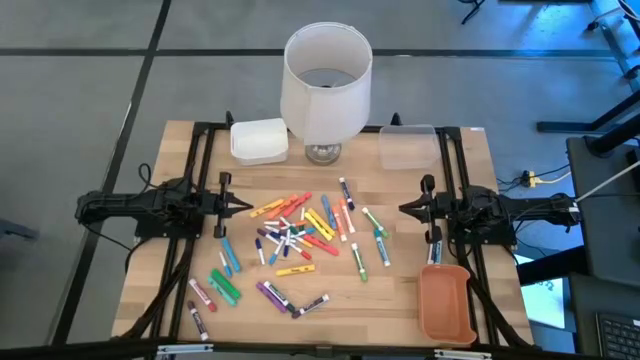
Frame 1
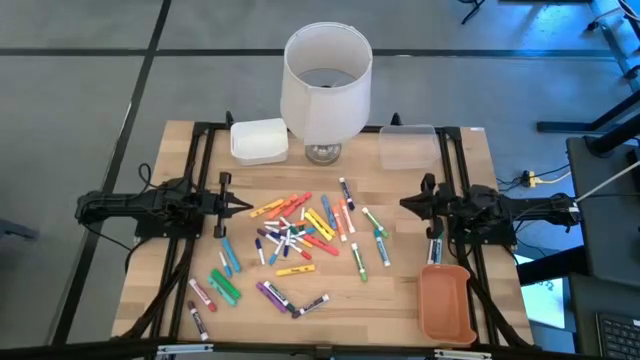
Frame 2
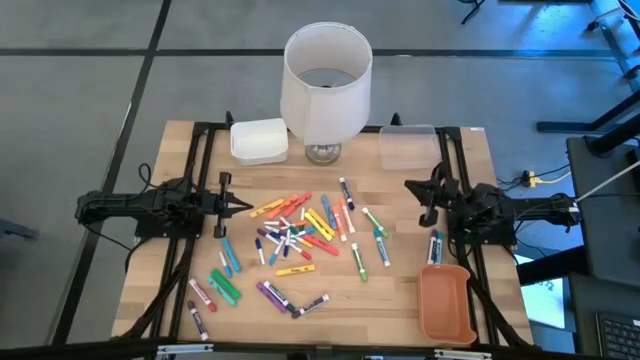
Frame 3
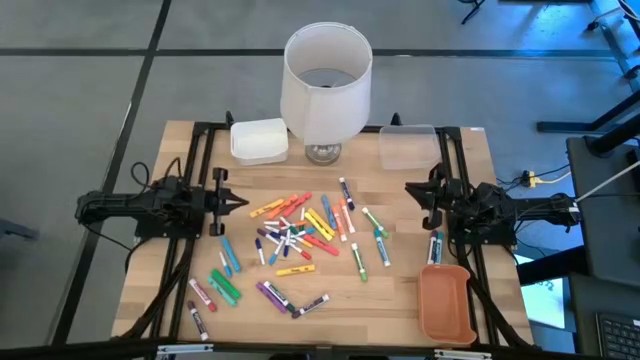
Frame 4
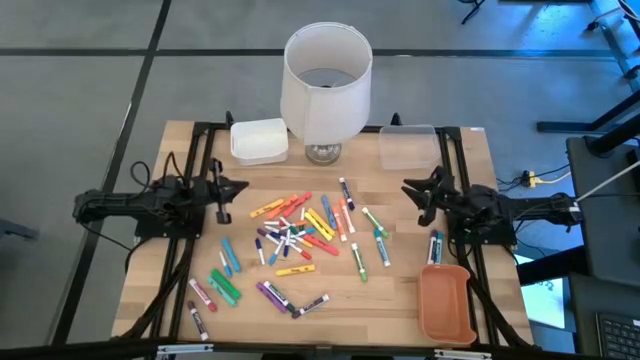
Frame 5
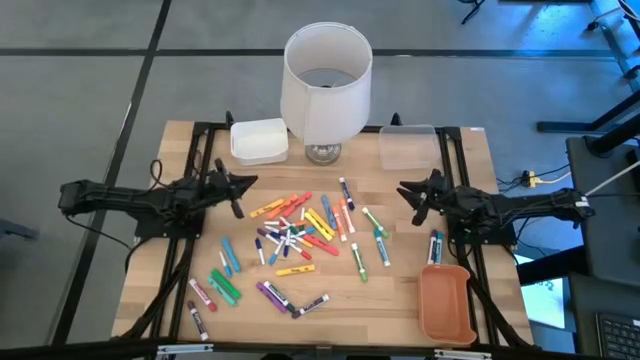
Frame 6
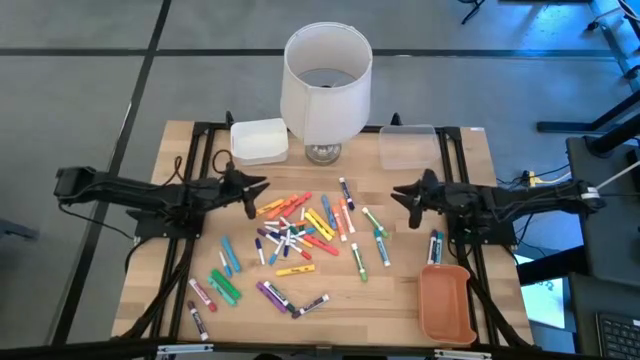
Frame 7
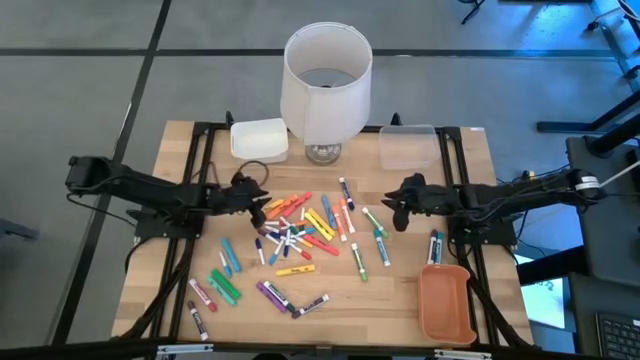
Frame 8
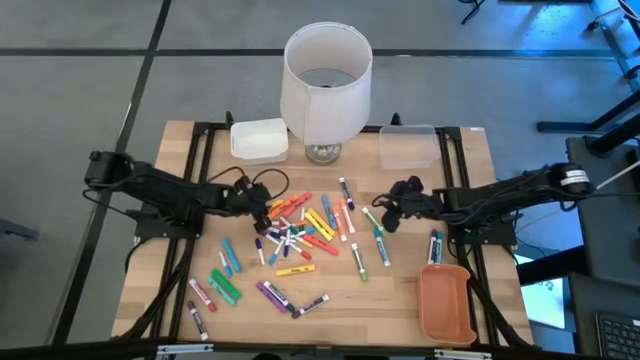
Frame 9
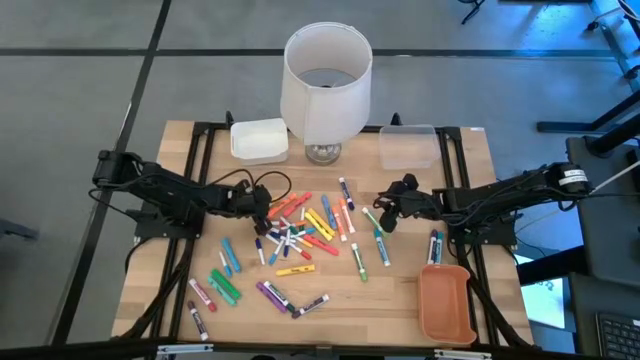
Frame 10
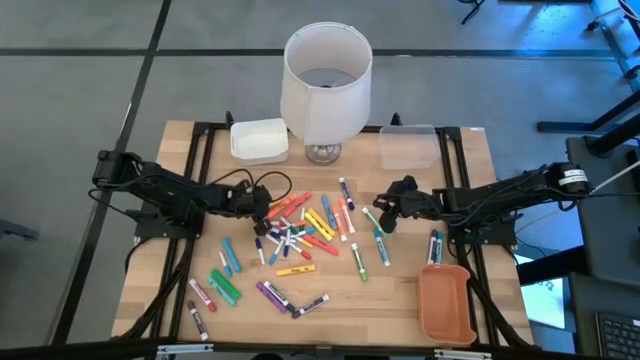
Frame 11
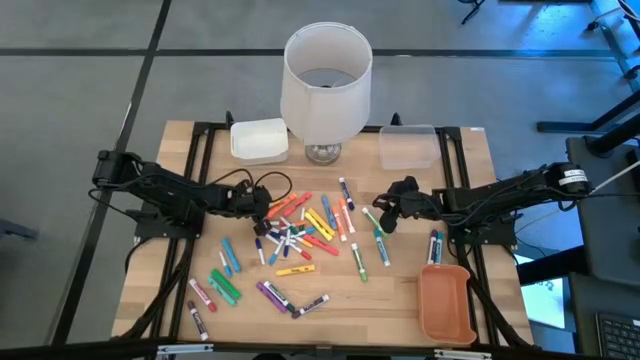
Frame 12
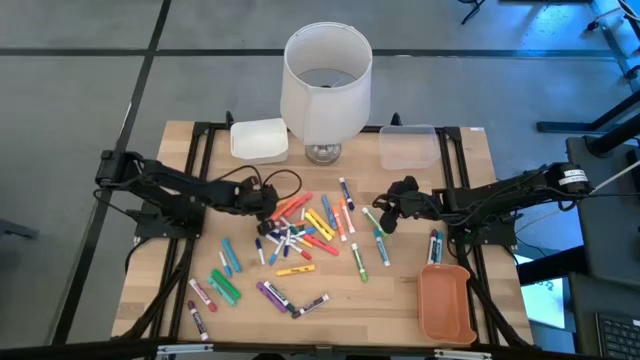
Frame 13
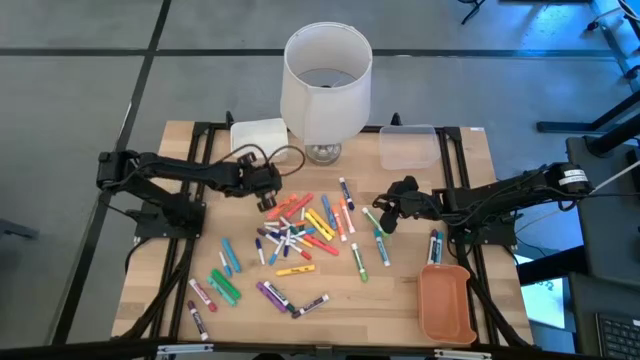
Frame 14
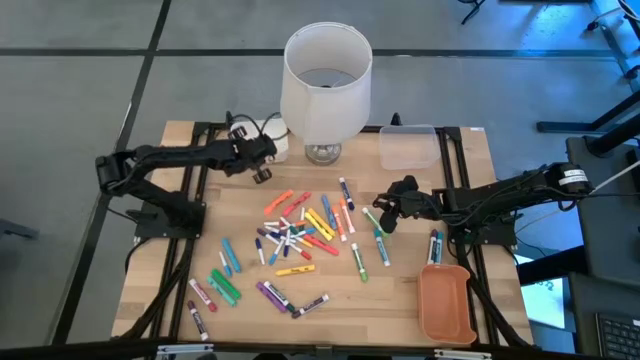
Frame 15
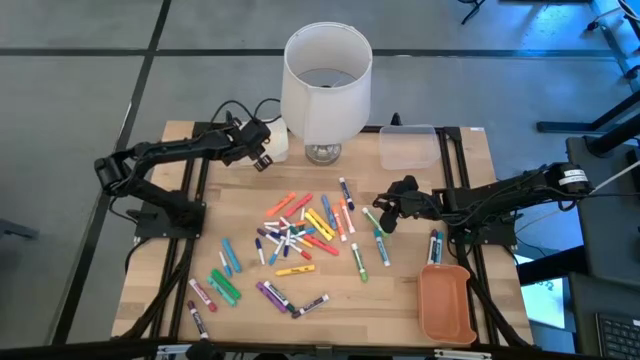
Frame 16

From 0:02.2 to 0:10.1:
Task: Pick & Place Markers
Put the yellow highlighter into the white bin

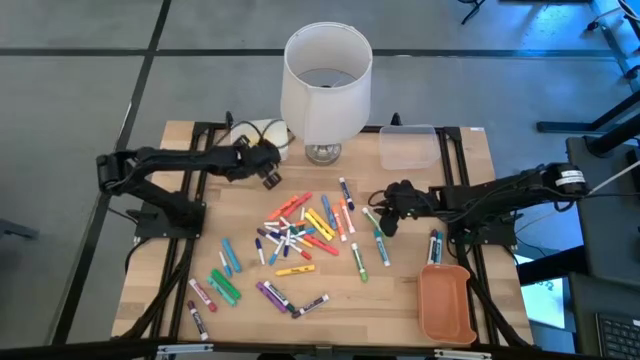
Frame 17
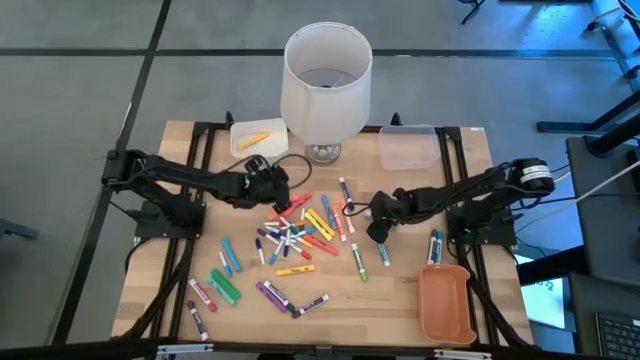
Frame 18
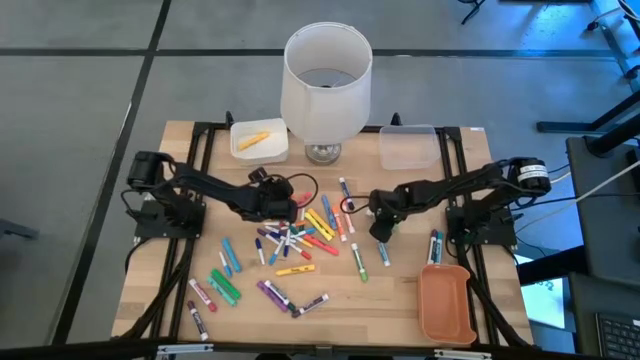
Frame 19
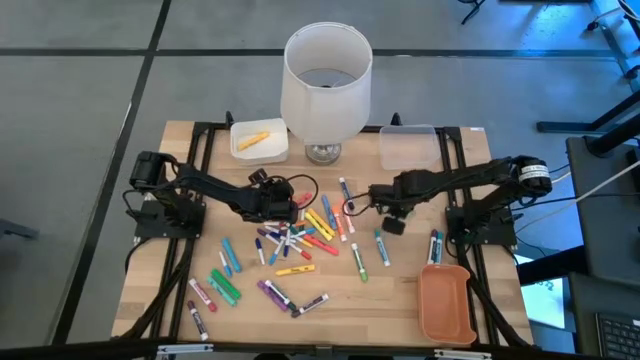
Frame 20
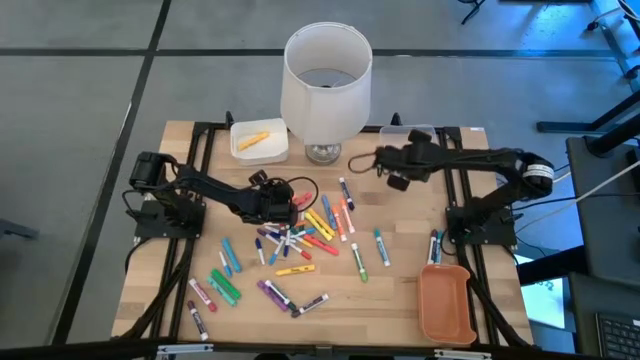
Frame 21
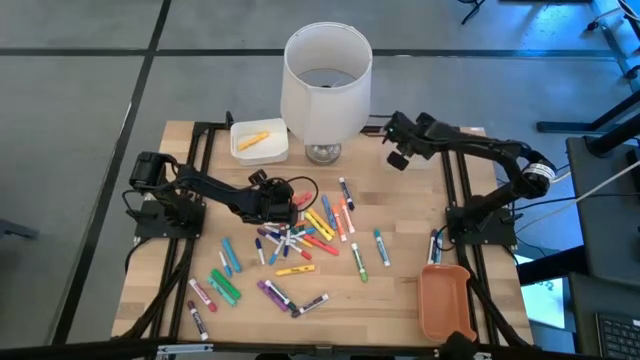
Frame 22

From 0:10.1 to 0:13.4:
Put the thick light green dry erase marker into the transparent bin

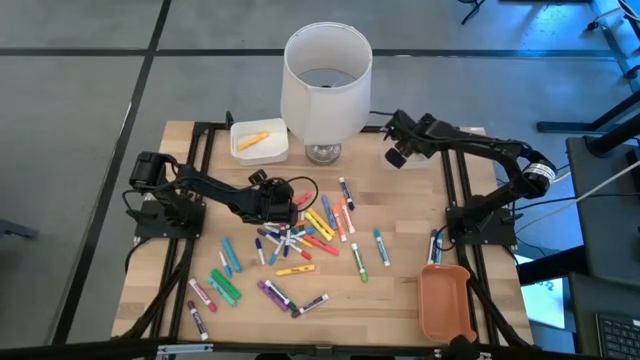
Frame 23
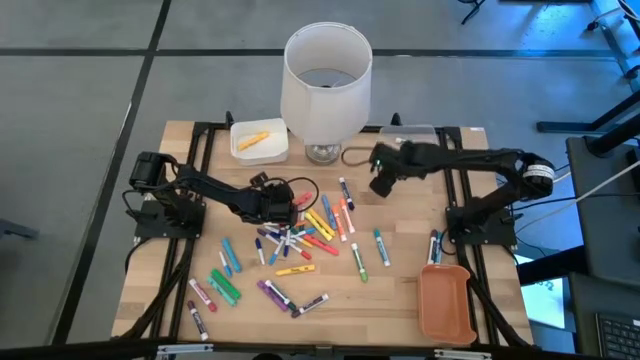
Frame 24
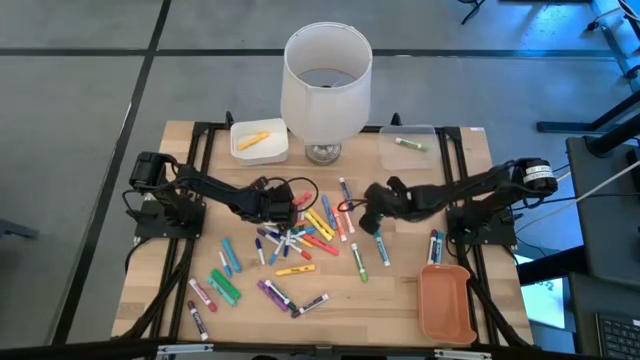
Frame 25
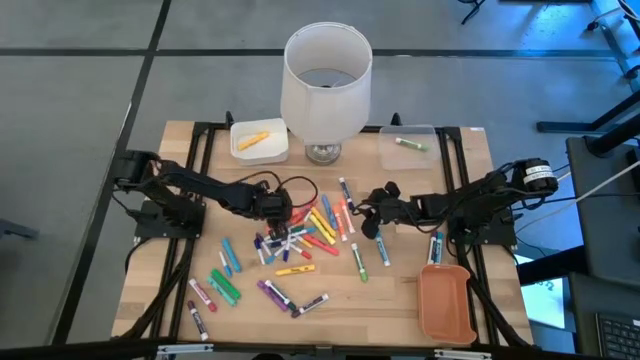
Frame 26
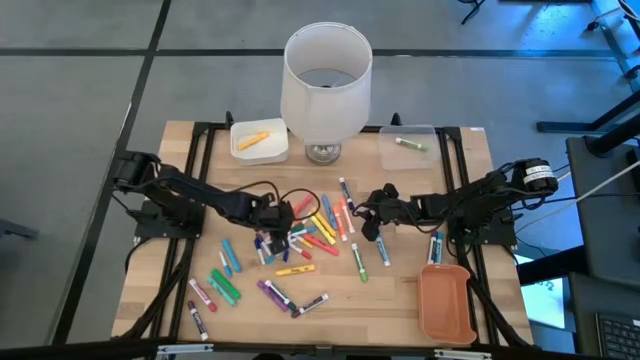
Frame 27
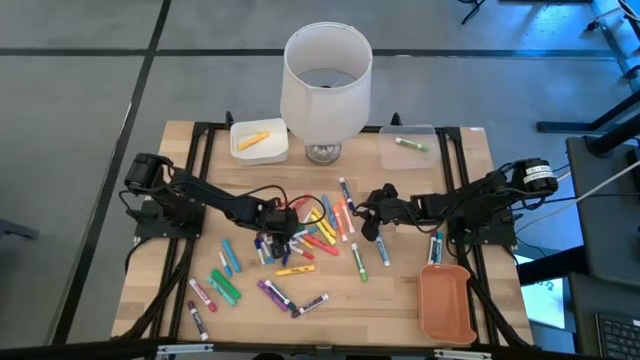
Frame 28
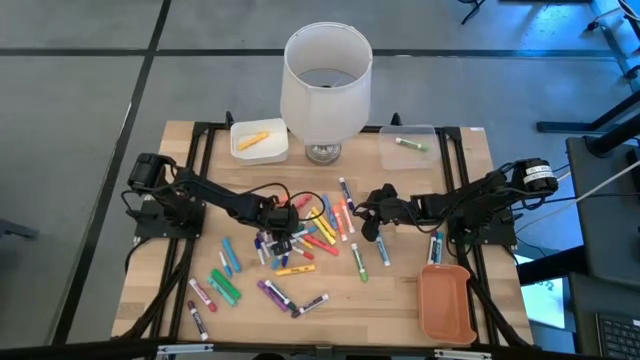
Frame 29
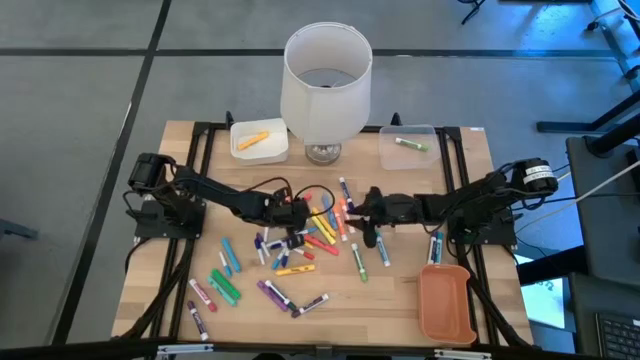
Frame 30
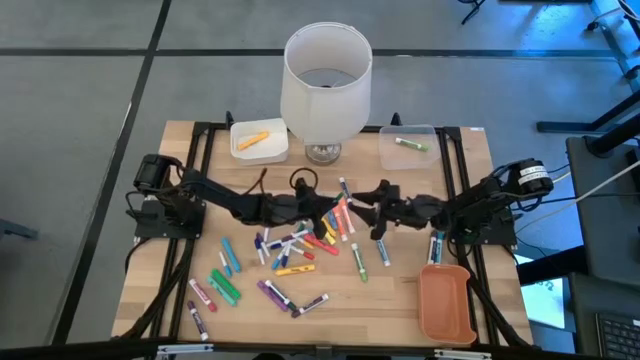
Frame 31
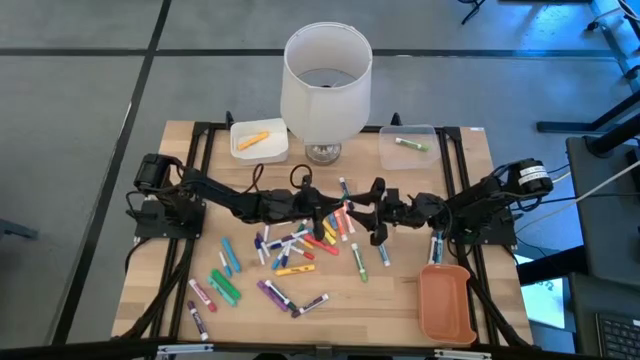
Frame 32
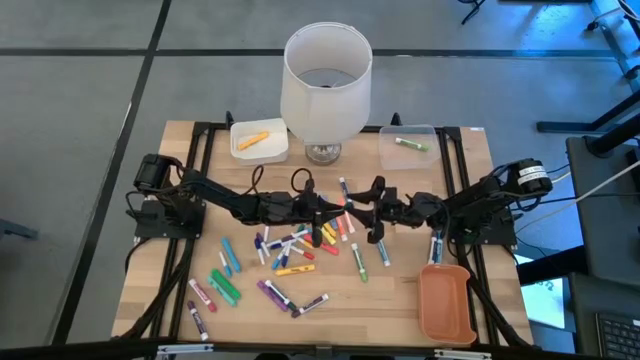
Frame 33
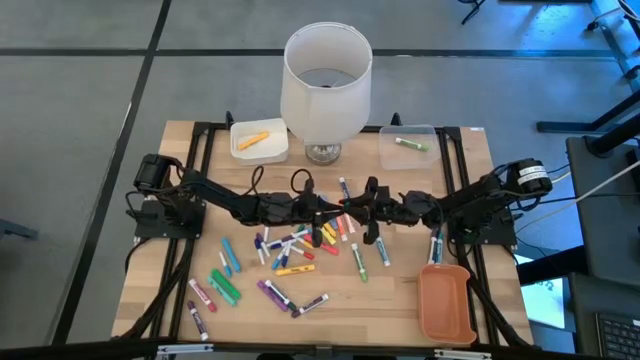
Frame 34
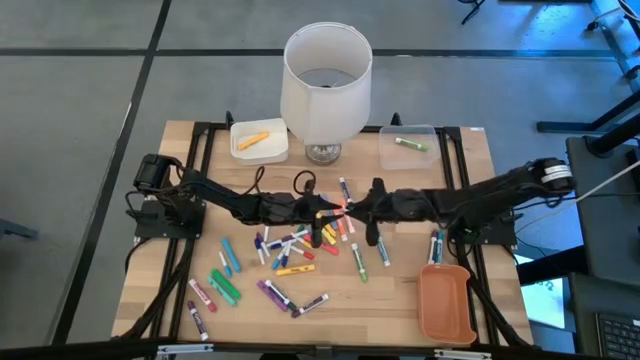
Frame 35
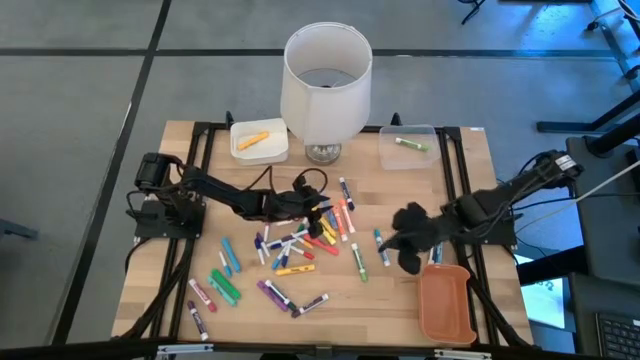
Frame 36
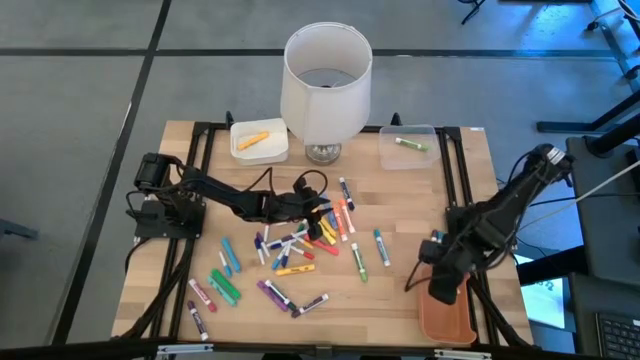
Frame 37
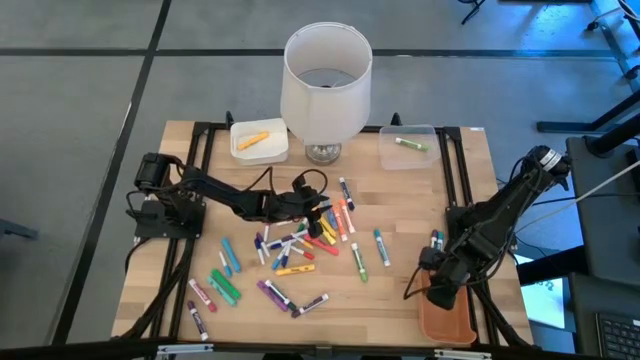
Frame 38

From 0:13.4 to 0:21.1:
Put the dark green mini marker into the orange bin

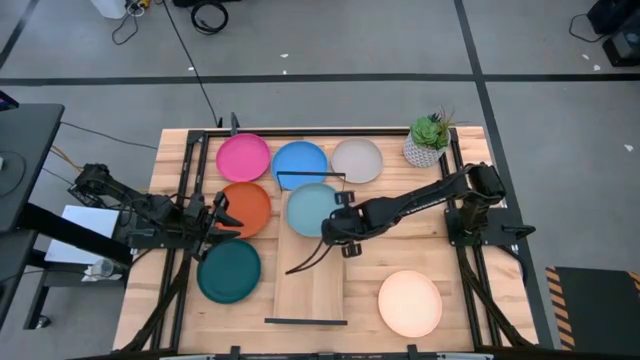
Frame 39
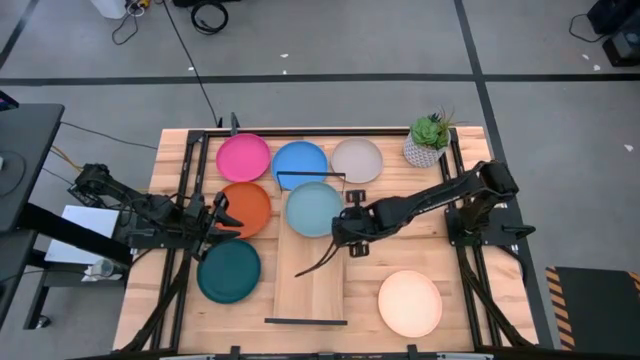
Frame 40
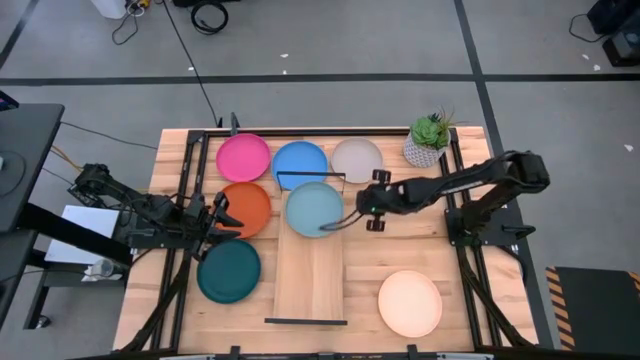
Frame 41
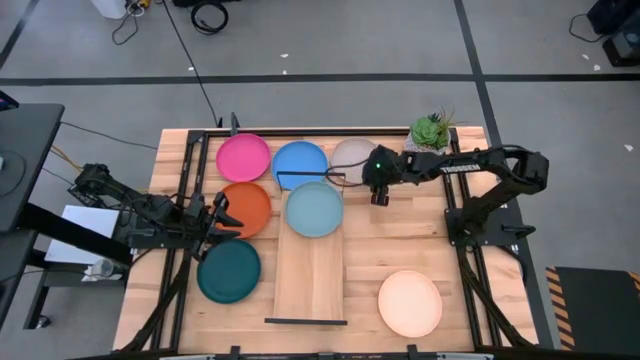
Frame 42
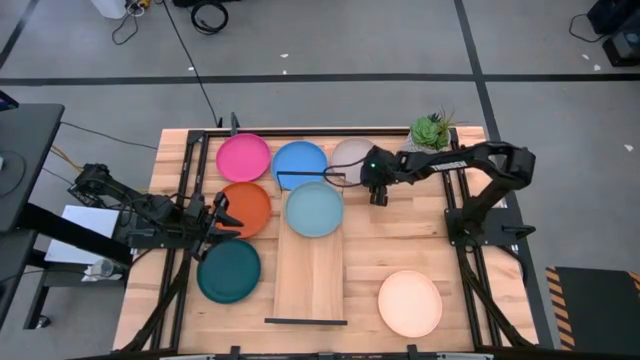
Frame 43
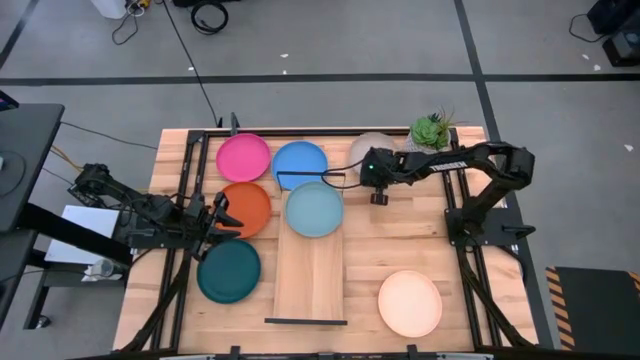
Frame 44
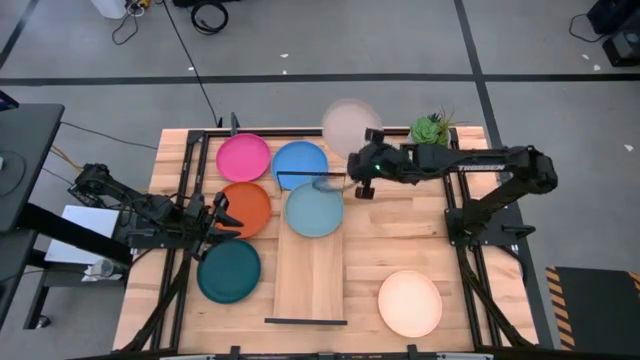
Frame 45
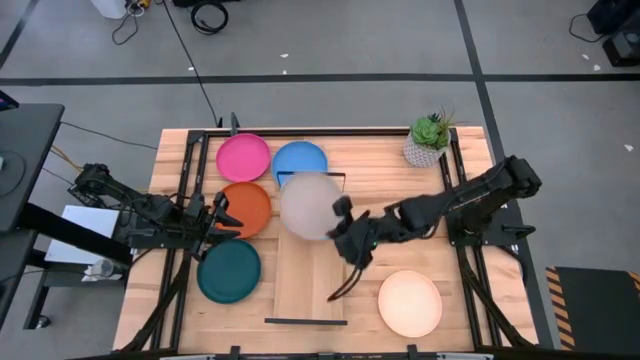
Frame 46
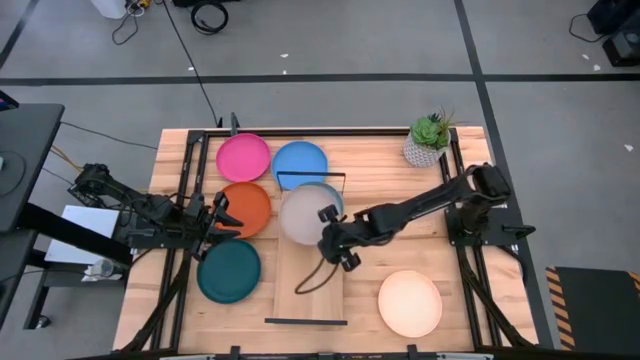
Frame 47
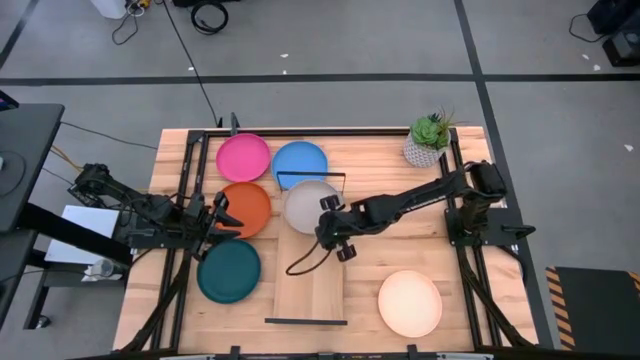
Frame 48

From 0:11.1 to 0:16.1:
Task: Place and stack plates onto a shelf
Stack the gray plate on top of the light blue plate on the shelf
